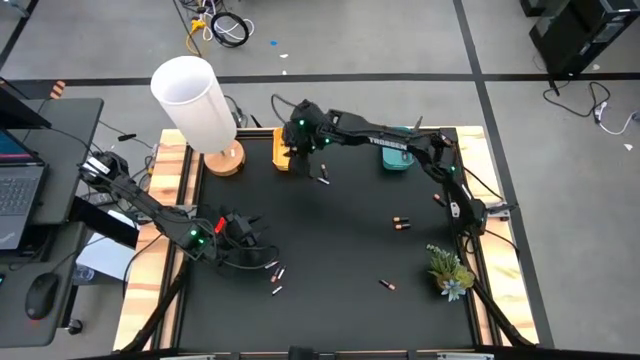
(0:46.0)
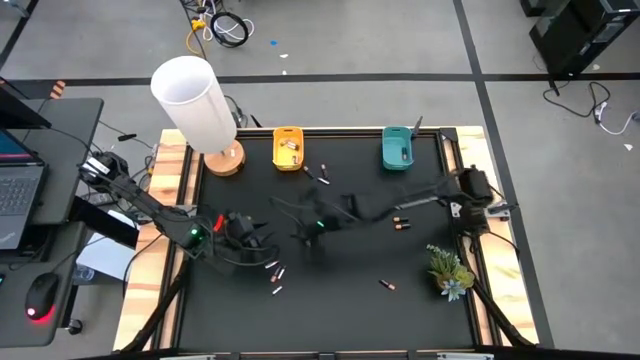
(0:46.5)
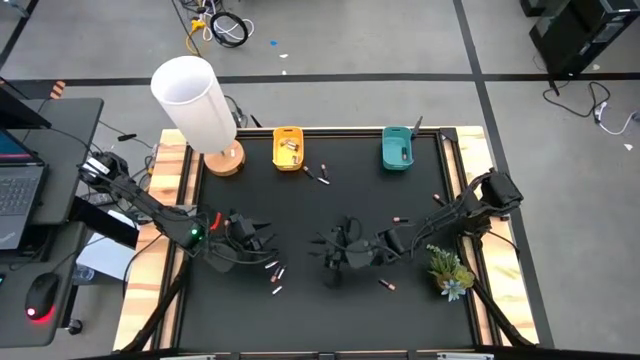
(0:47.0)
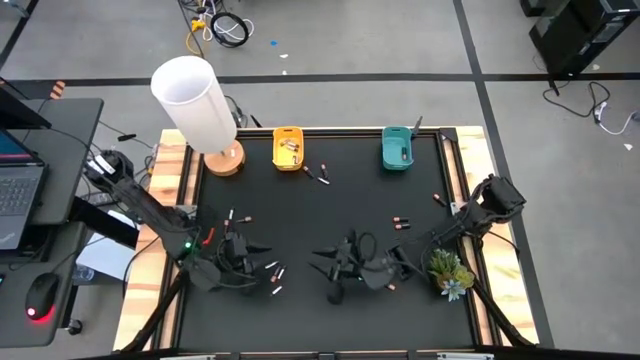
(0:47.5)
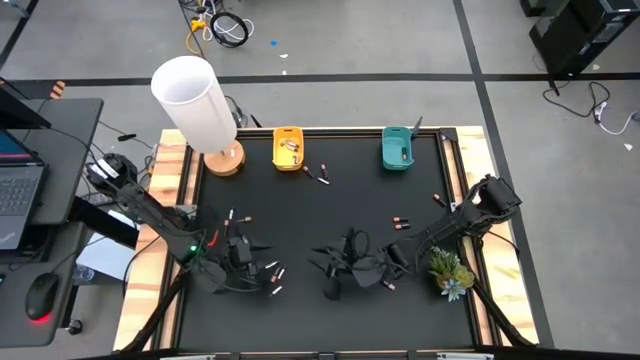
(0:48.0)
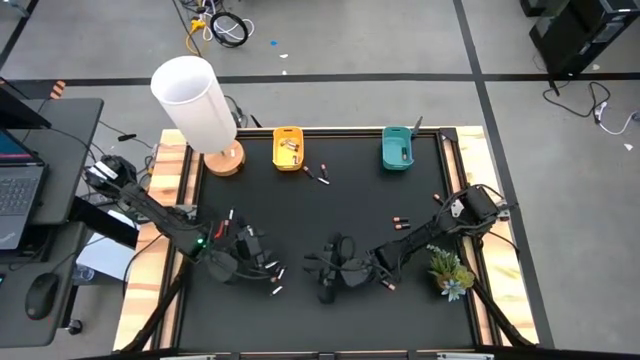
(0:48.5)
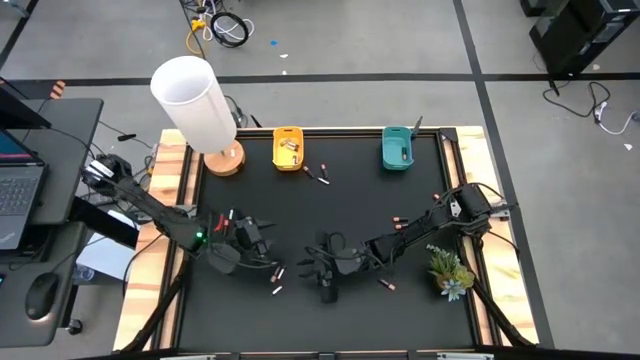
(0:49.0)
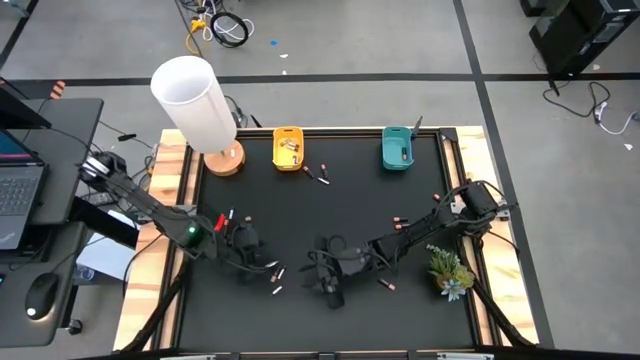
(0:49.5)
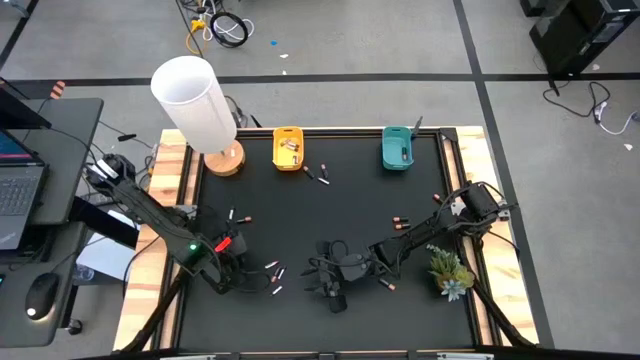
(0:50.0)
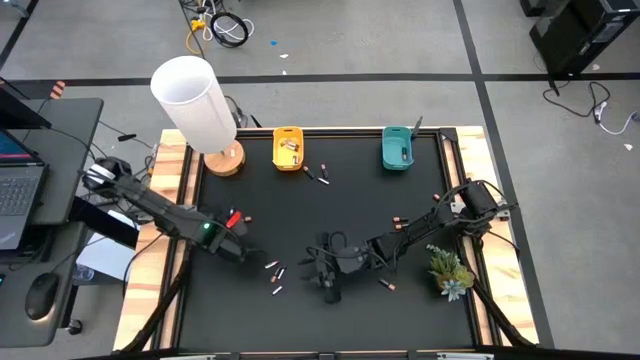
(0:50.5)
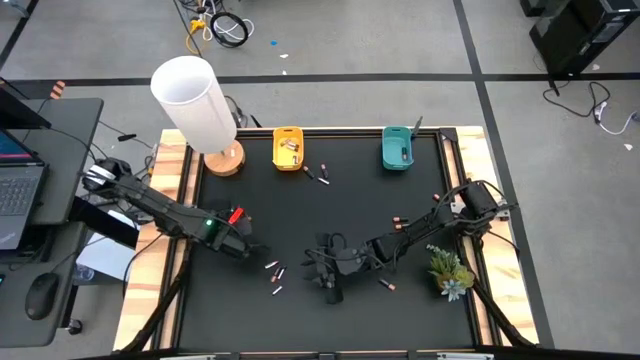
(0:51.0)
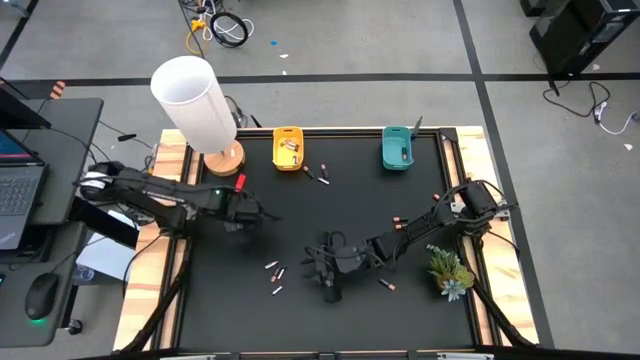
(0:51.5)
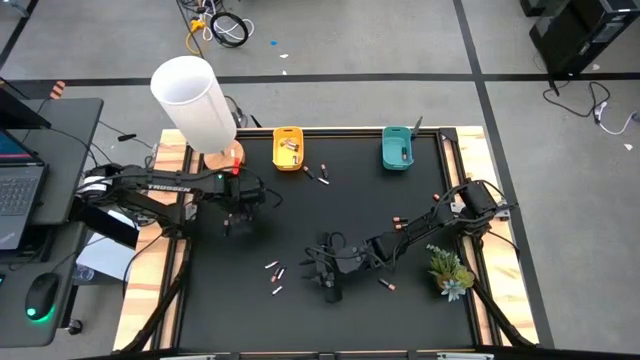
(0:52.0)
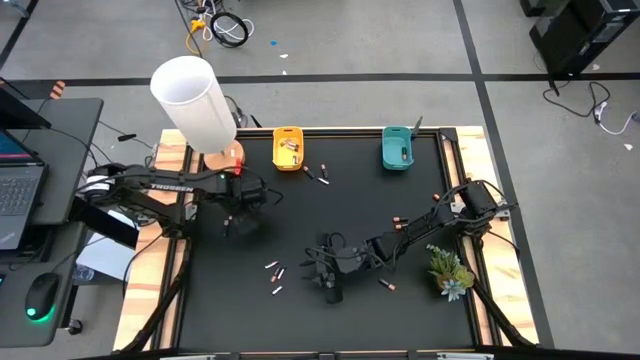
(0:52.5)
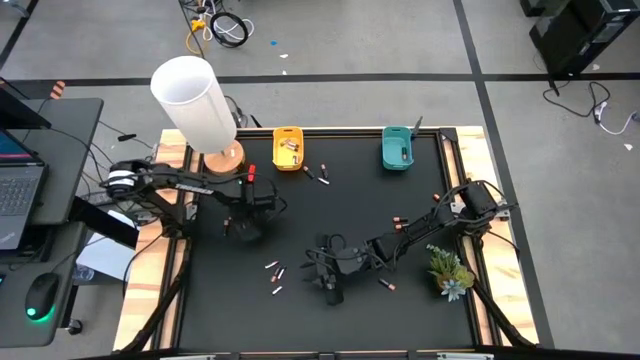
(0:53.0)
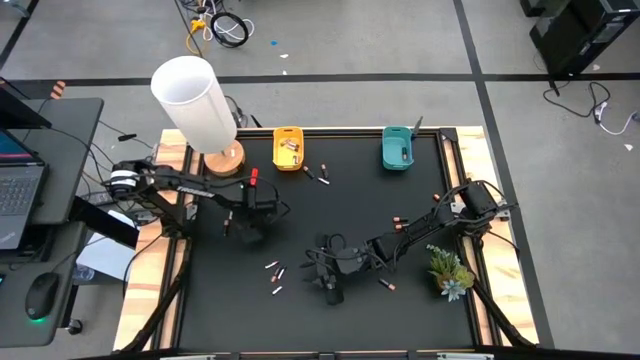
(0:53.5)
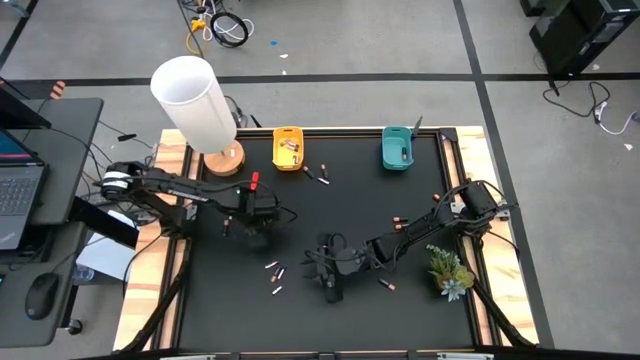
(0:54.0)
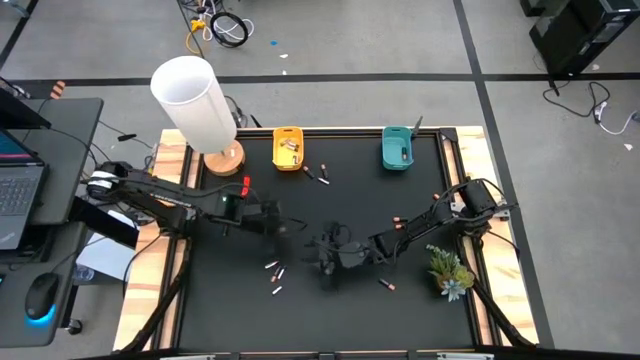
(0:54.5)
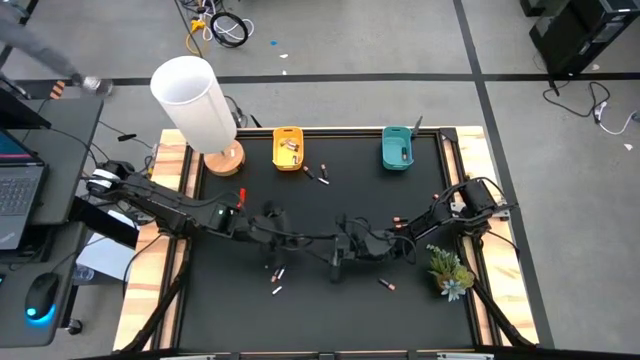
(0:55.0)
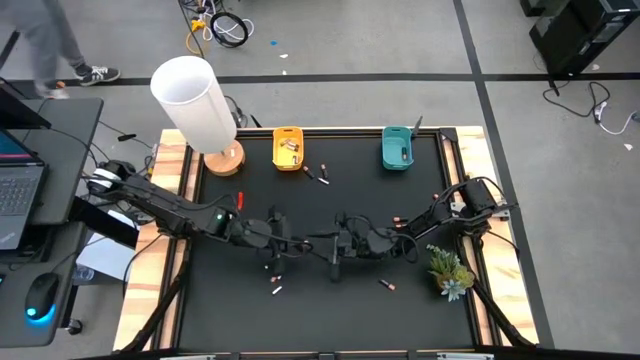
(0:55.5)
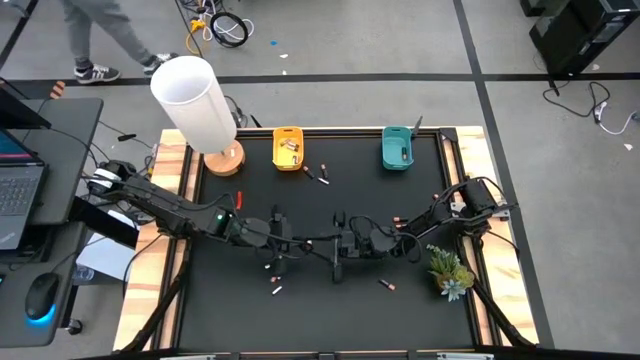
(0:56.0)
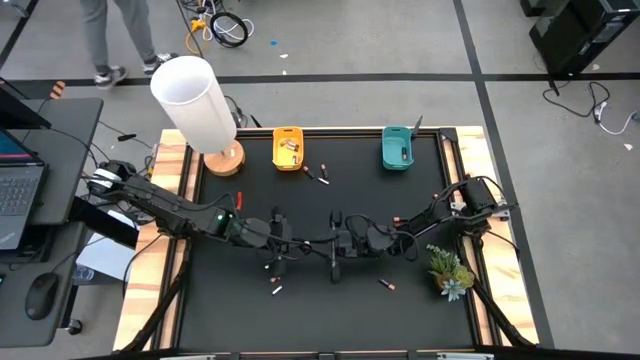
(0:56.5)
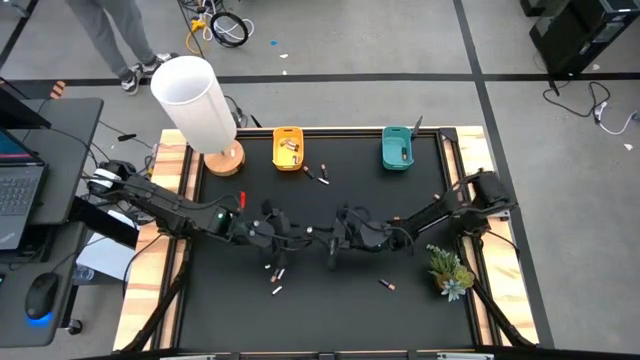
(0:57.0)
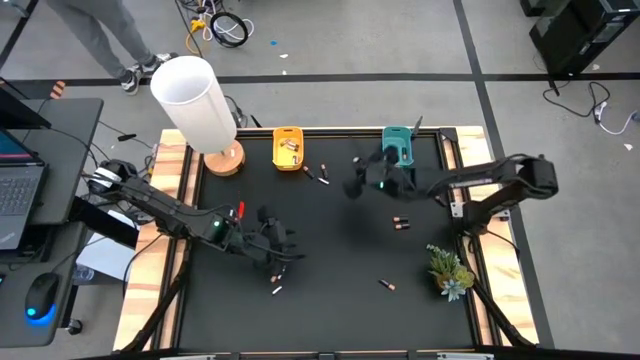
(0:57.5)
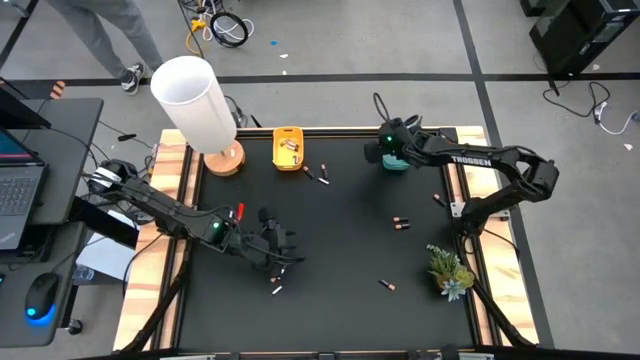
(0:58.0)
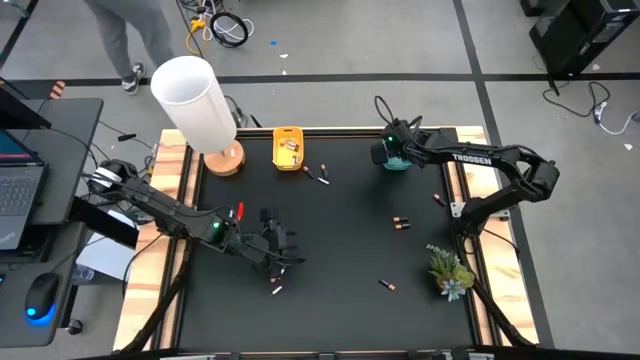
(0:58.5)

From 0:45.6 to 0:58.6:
Task: Sort batteries
Put the black battery into the blue bin

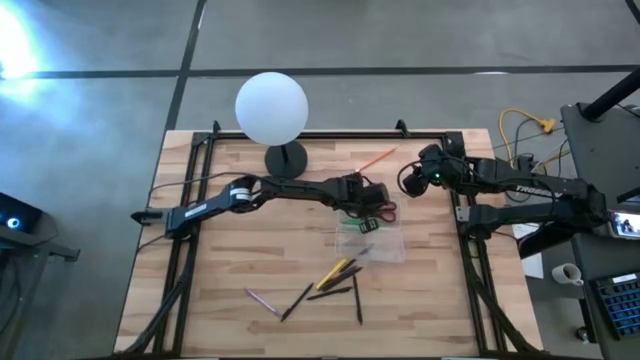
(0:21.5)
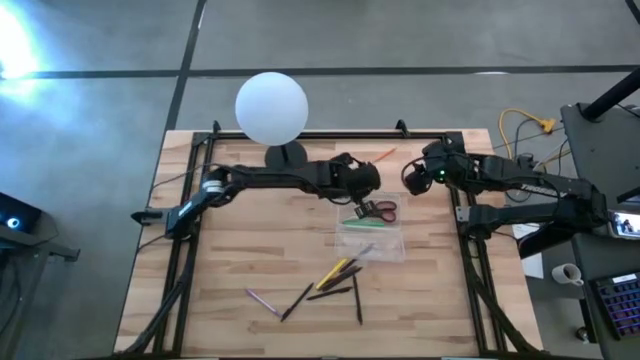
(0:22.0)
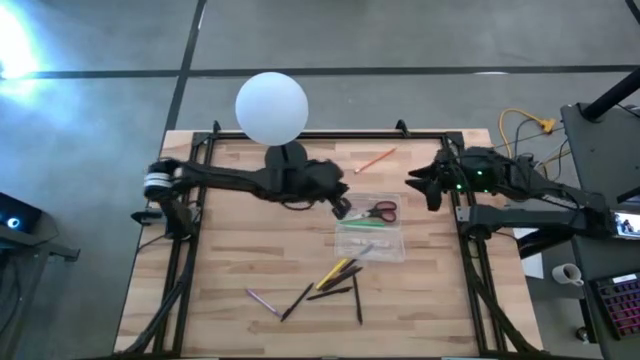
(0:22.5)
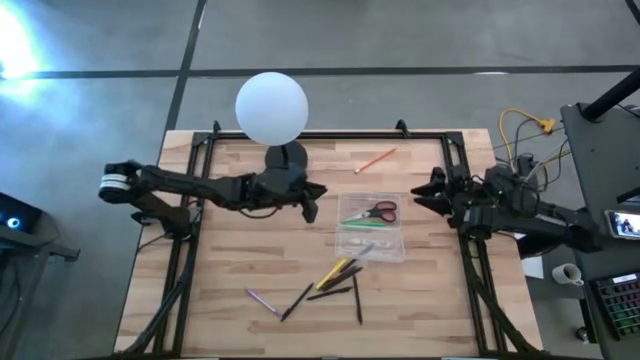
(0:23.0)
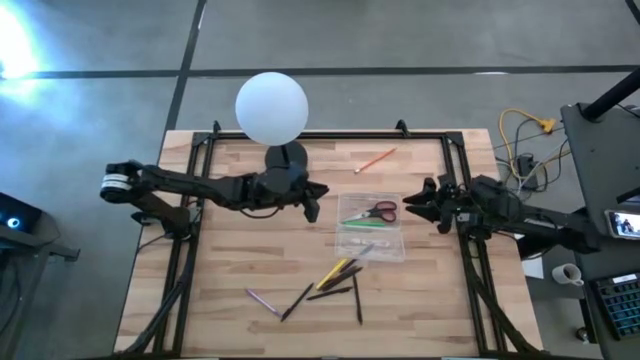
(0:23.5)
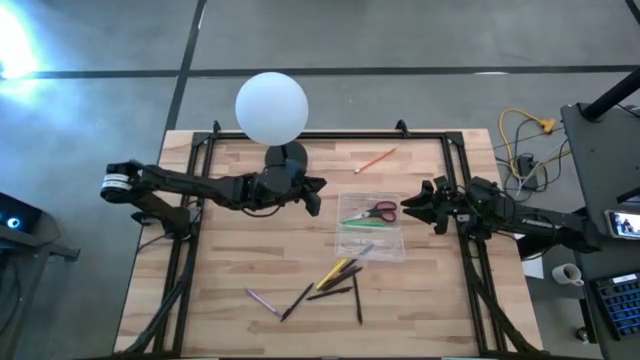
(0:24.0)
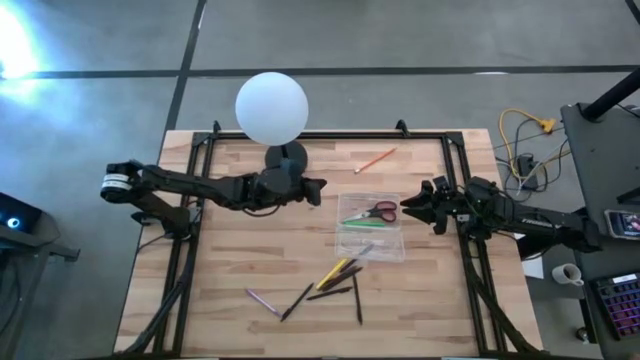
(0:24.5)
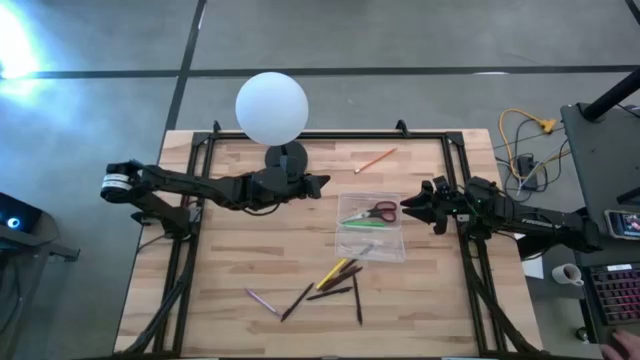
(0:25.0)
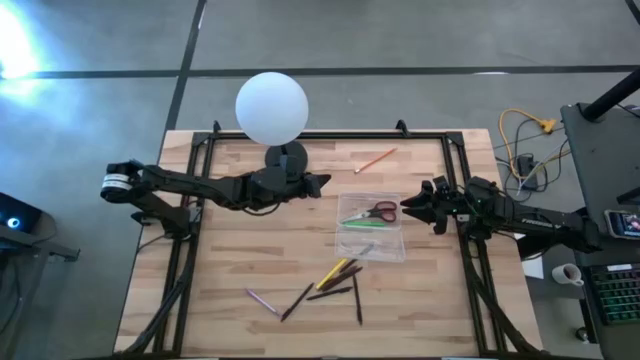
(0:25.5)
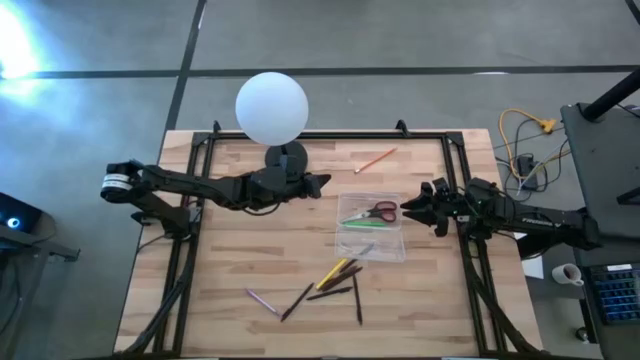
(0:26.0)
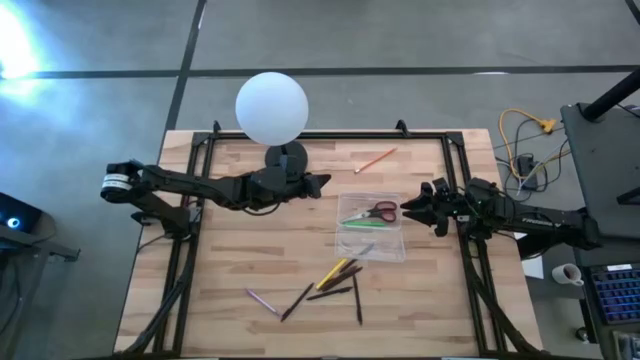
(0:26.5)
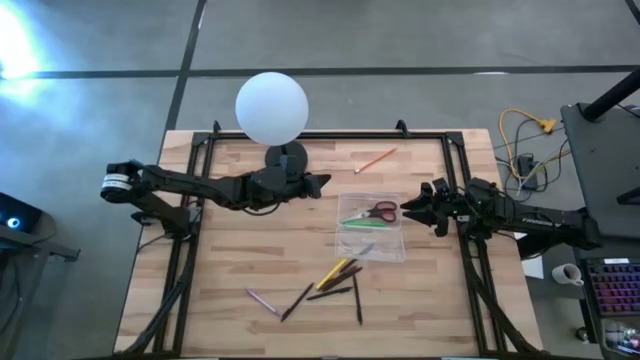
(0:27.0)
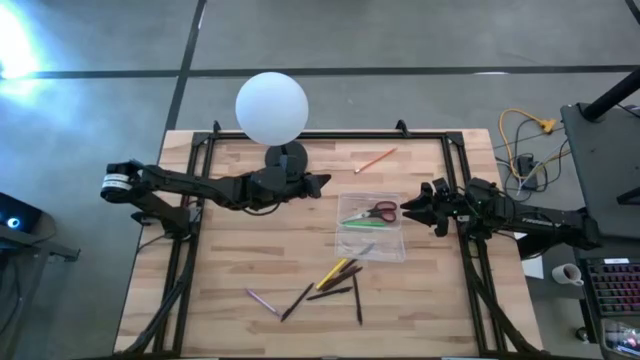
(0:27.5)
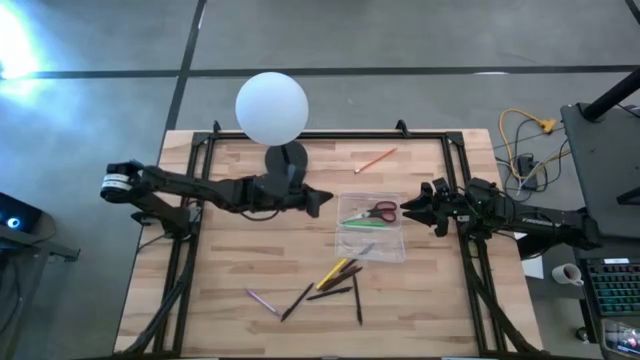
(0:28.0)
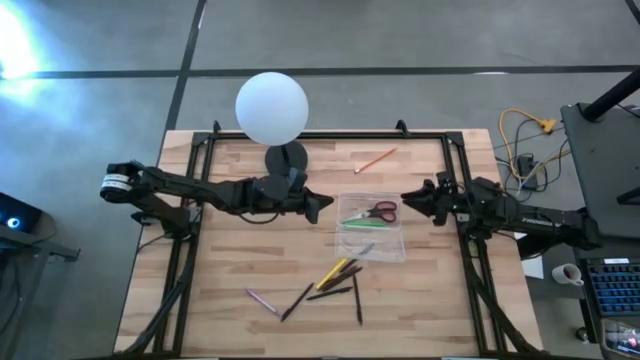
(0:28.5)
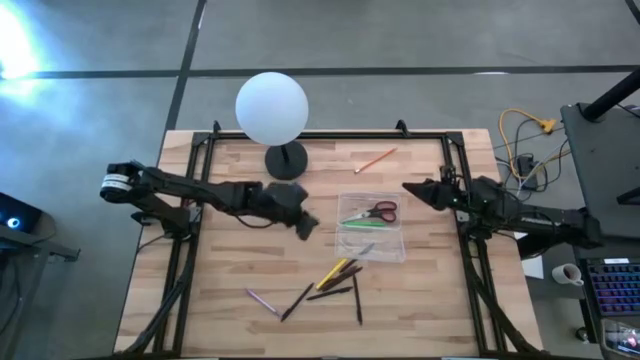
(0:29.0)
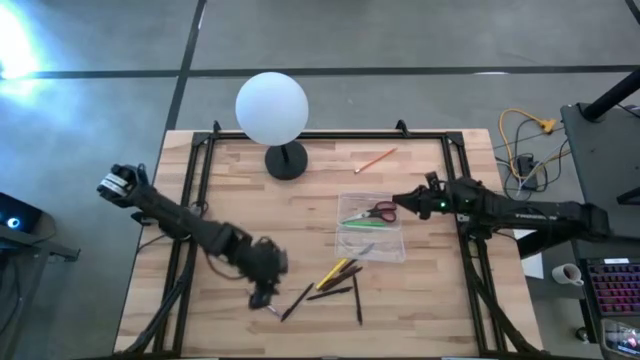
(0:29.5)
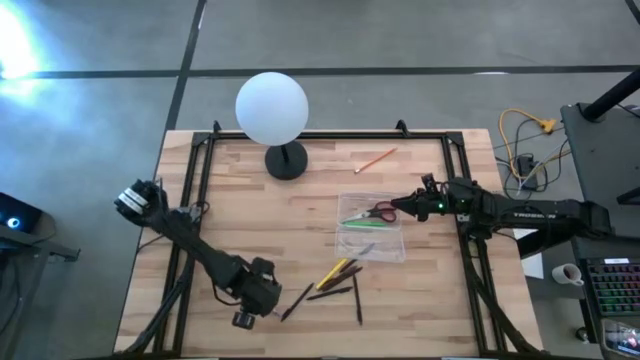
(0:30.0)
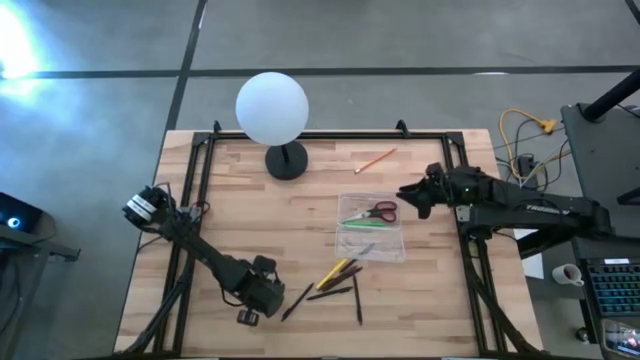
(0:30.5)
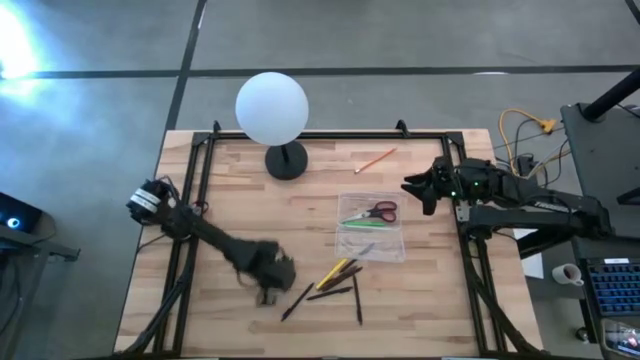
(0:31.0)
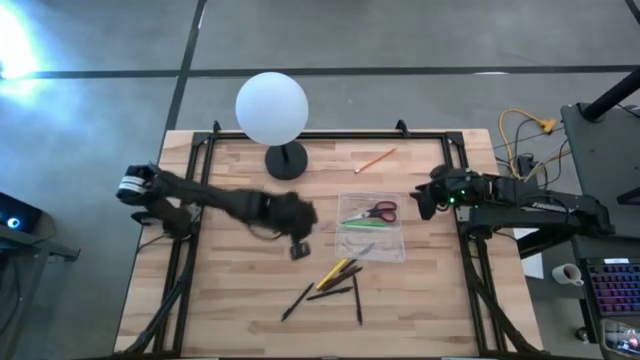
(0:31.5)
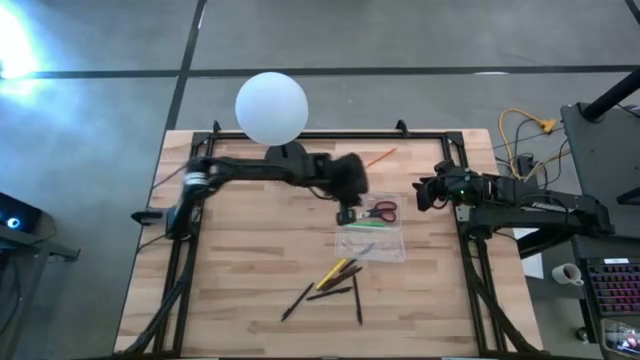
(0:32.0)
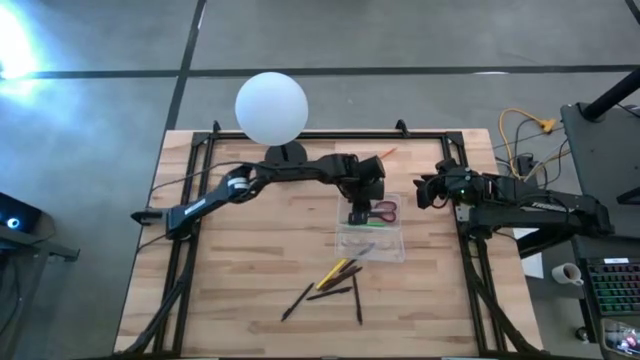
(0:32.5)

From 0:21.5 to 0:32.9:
Task: Pick & place school supplies into a supply box
Put the pink ballpen into the supply box
